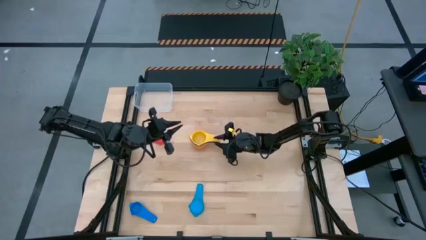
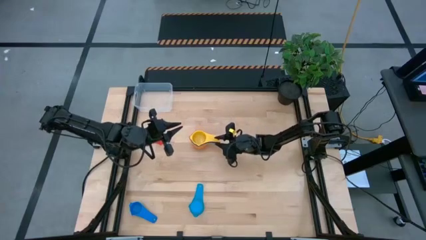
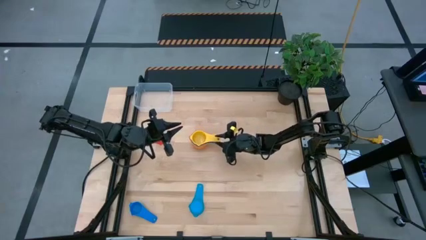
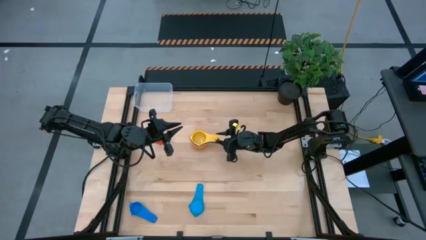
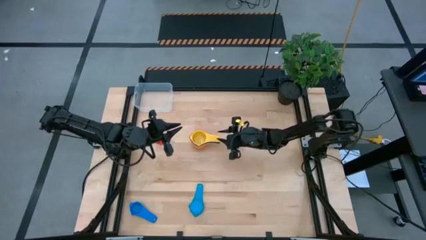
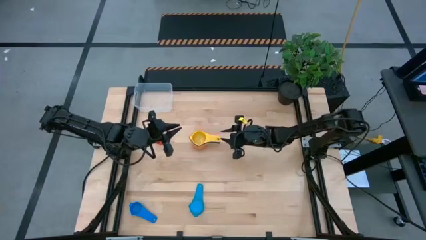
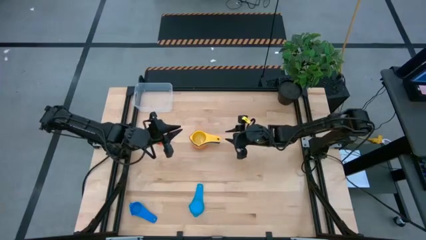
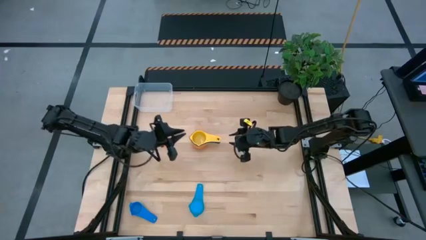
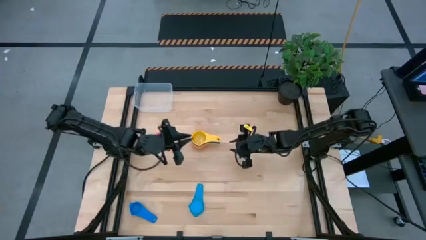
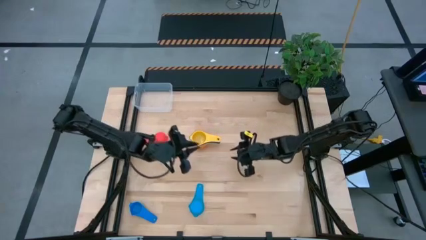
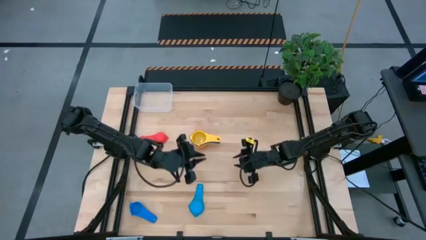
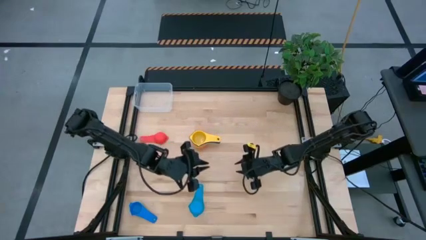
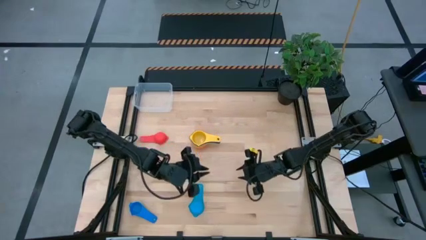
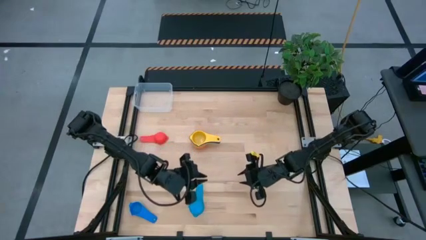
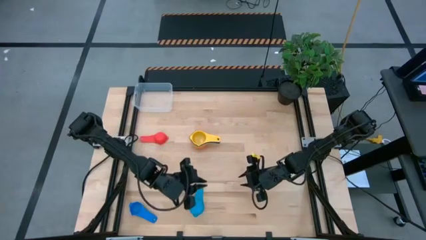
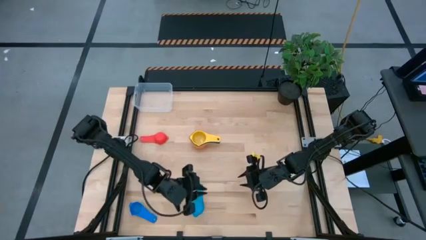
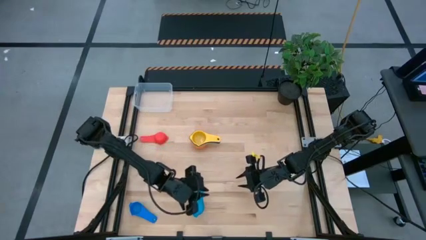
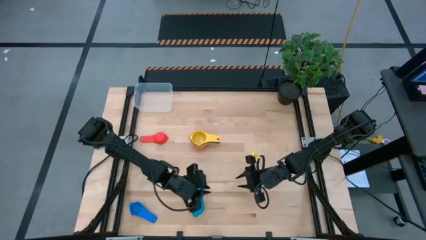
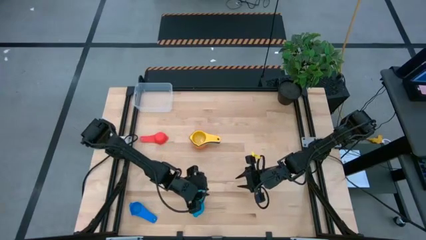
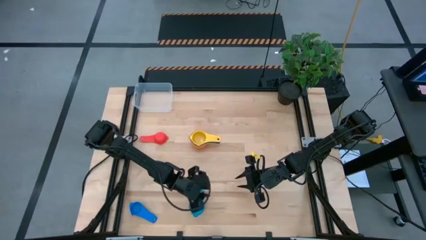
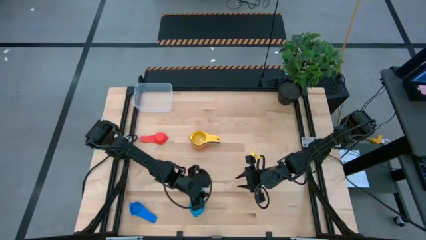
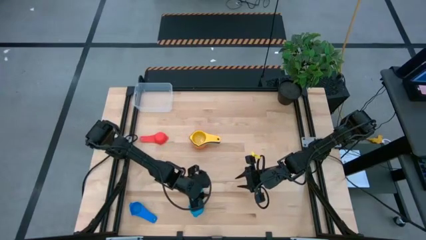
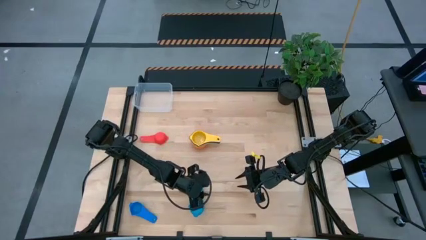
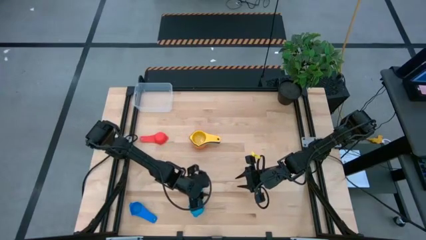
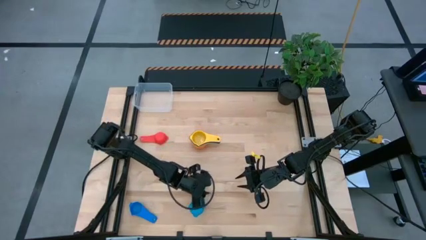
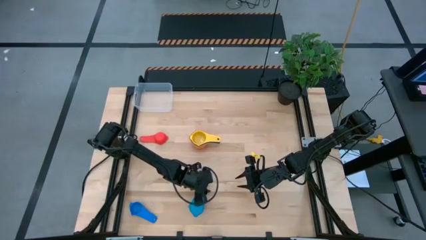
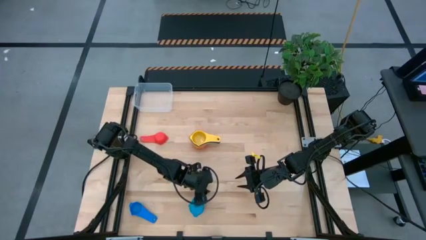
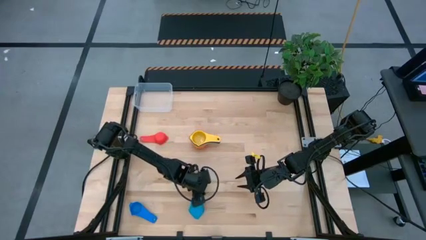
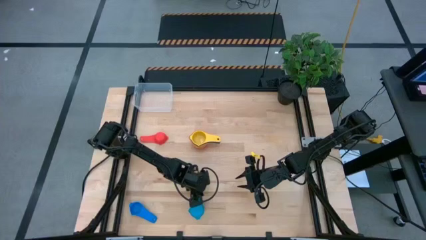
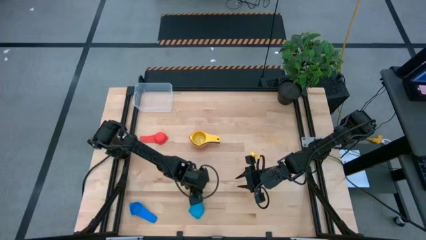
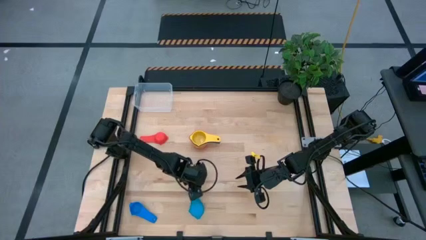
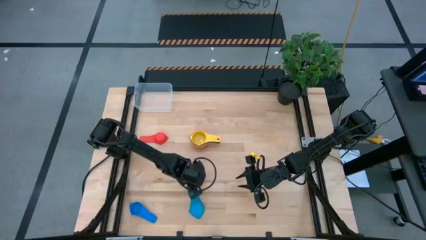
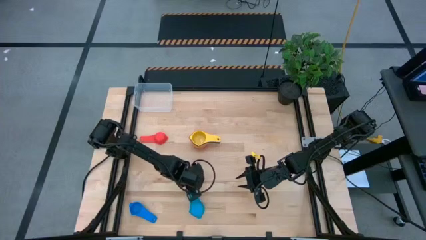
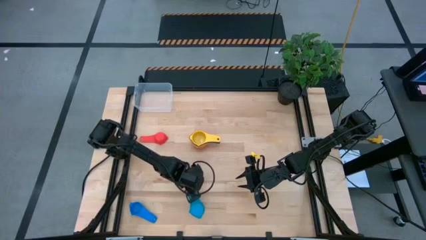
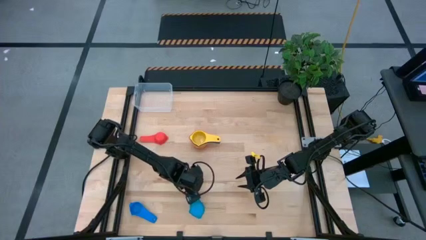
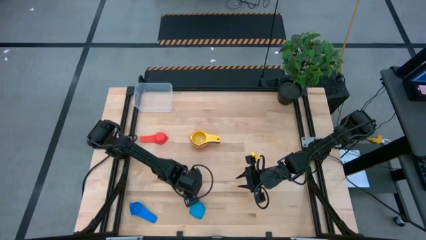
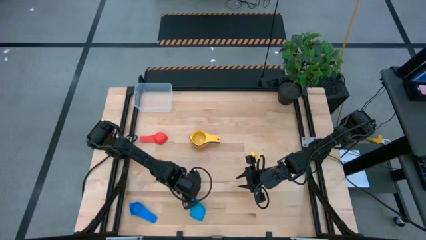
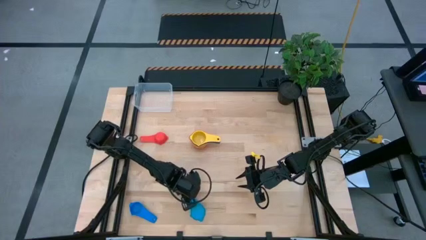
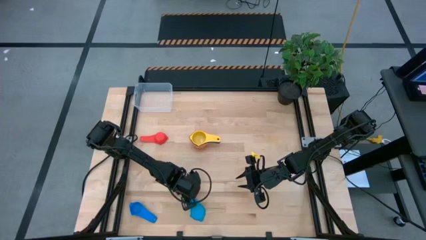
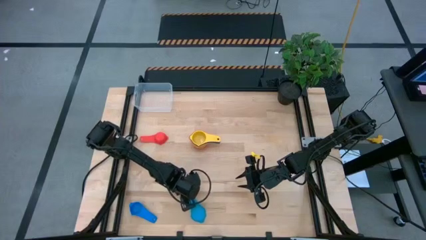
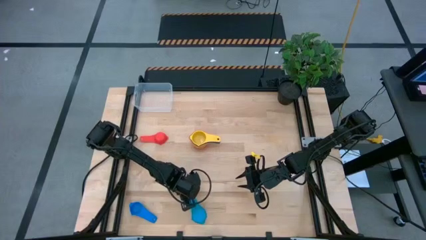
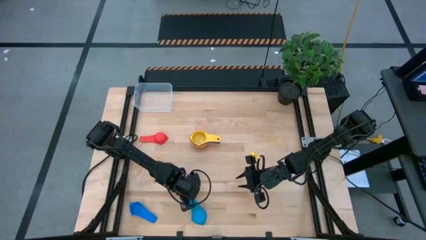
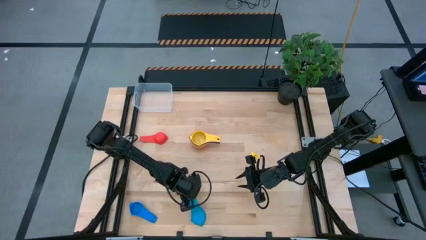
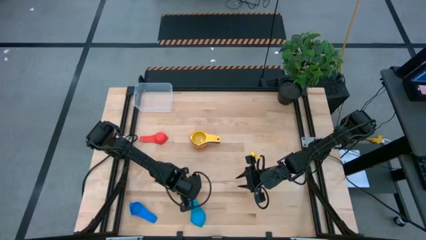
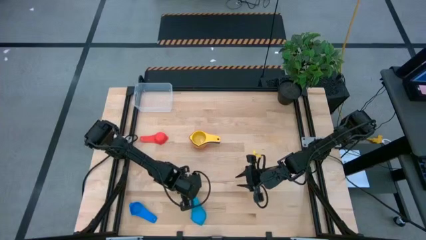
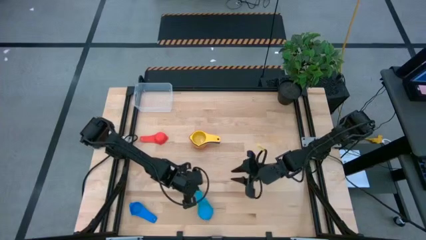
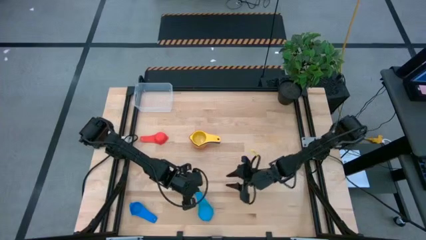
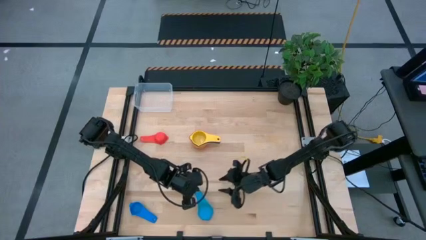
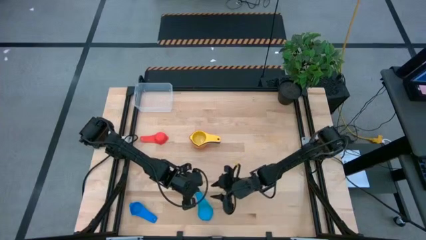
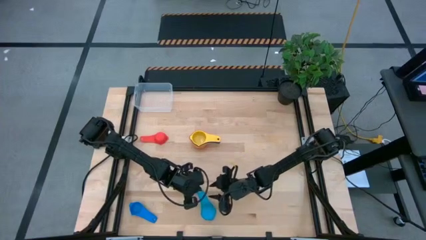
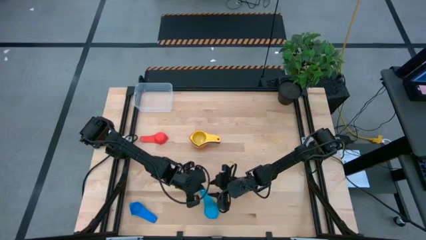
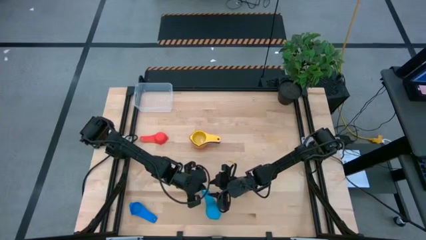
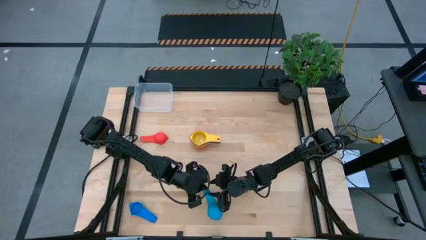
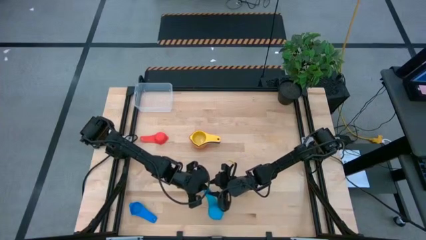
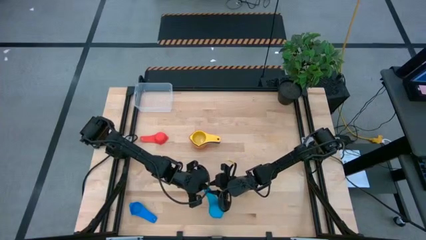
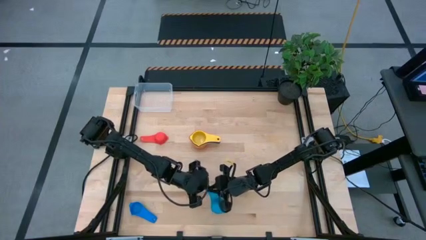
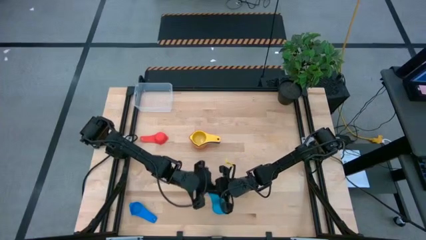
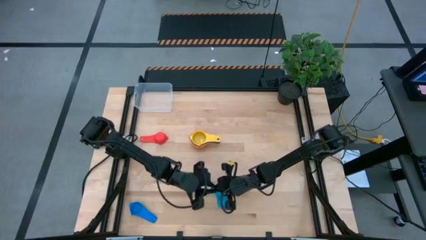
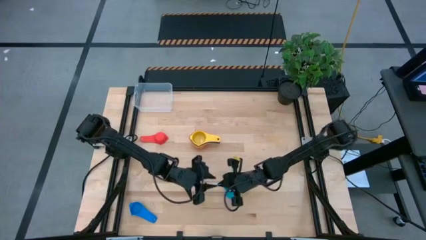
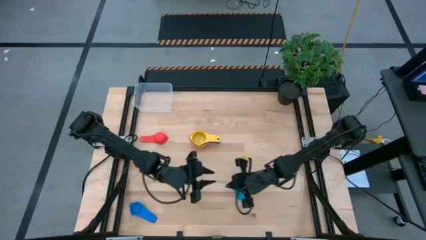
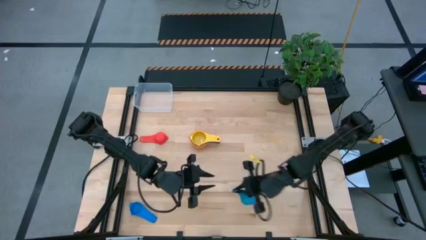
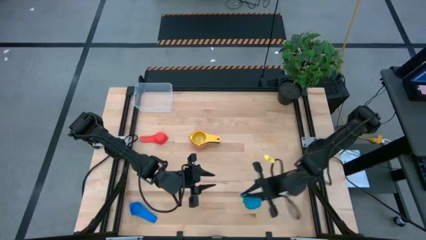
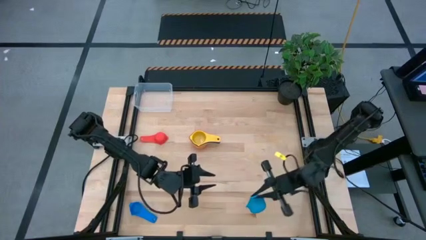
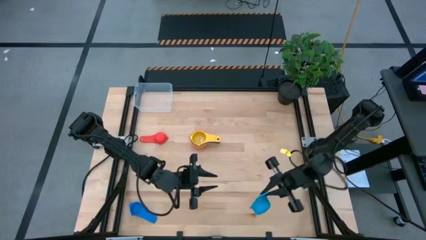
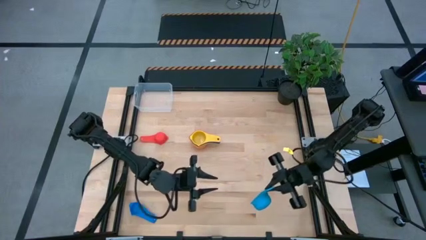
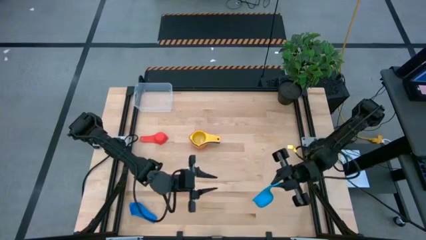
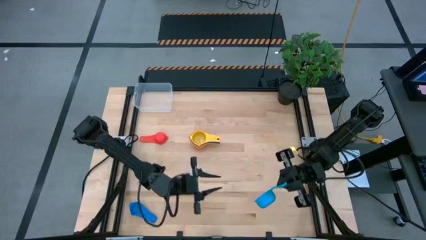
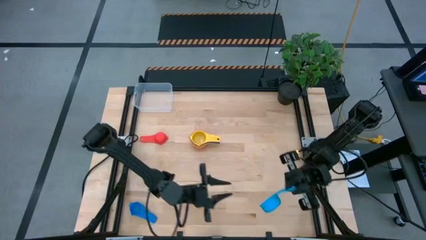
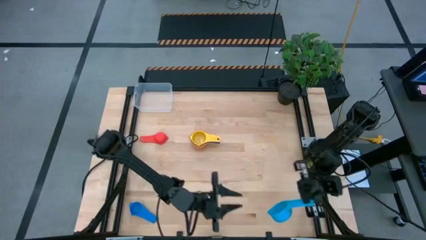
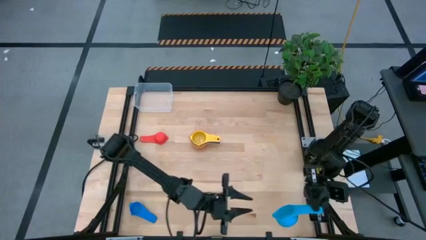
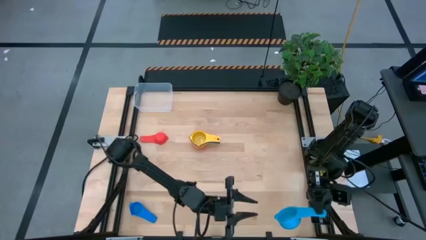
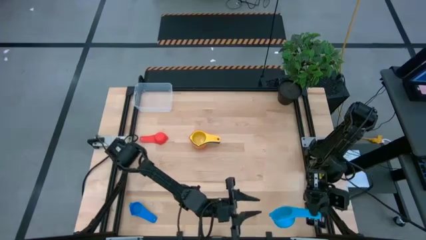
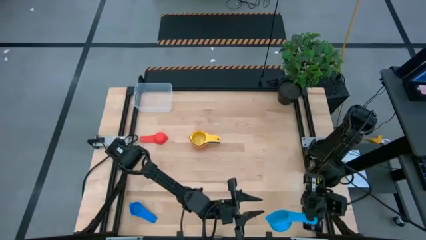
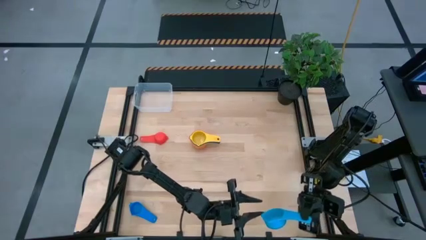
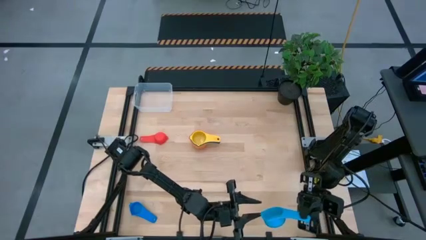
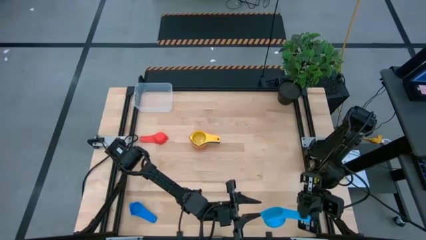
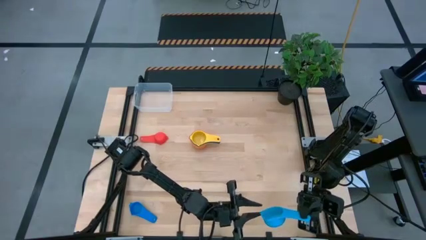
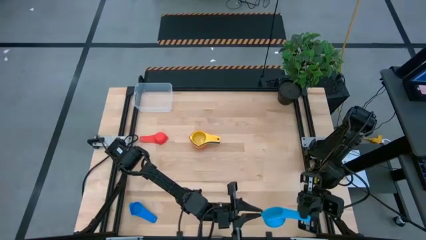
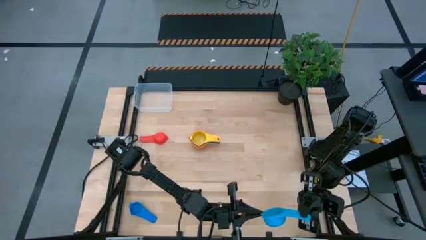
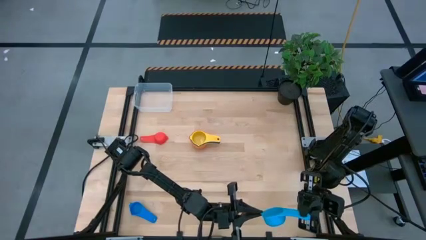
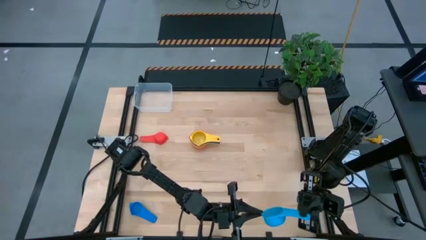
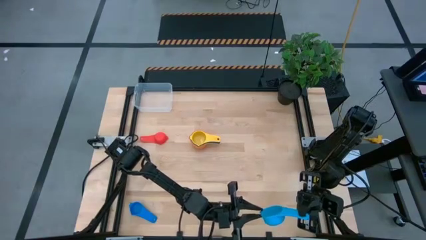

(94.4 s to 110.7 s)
Task: Nest measuring cups in basket
Stack the light blue measuring cup on top of the yellow measuring cup
